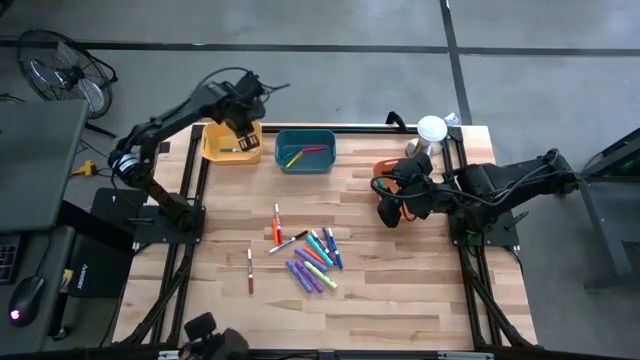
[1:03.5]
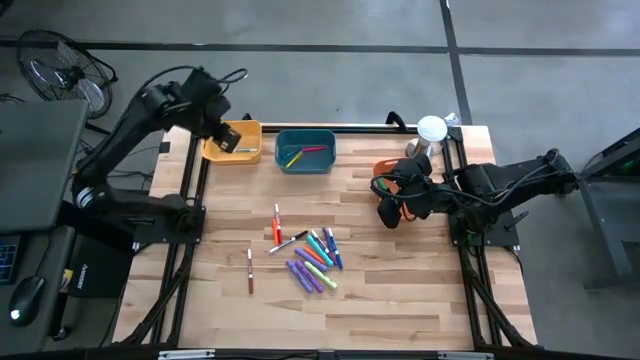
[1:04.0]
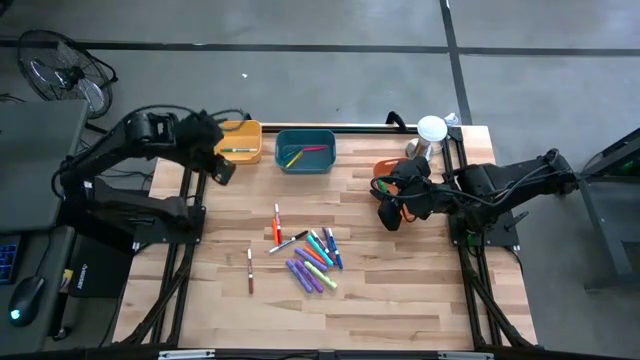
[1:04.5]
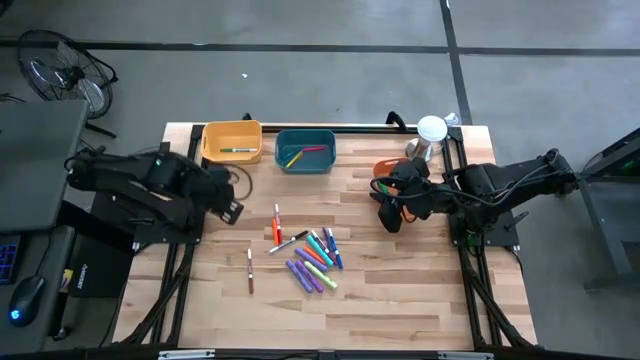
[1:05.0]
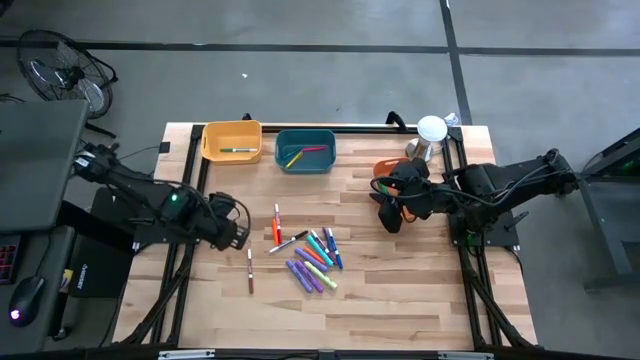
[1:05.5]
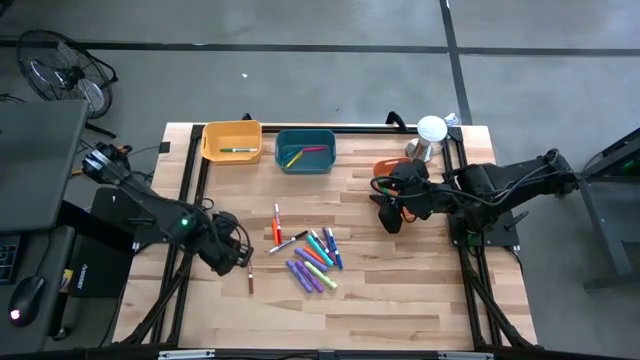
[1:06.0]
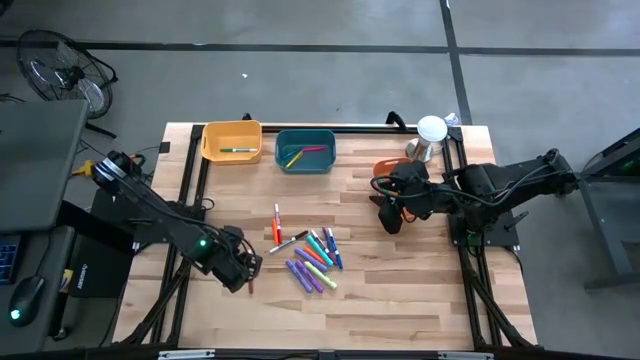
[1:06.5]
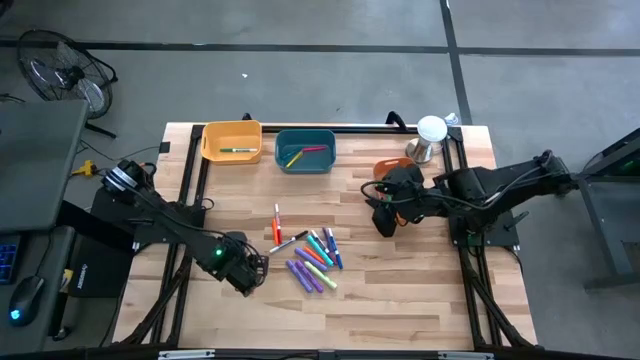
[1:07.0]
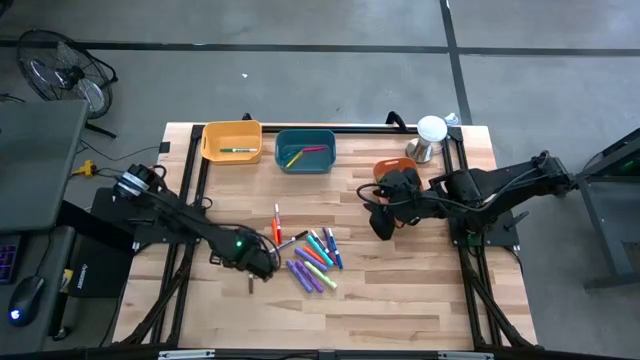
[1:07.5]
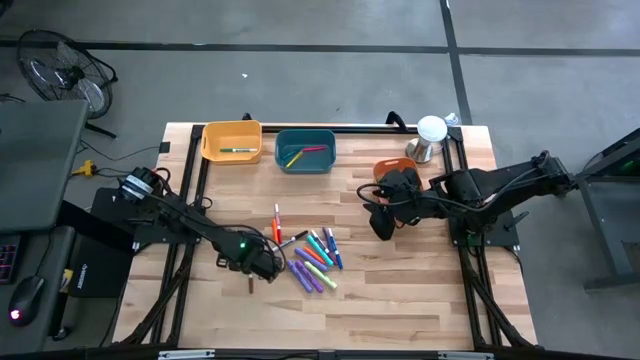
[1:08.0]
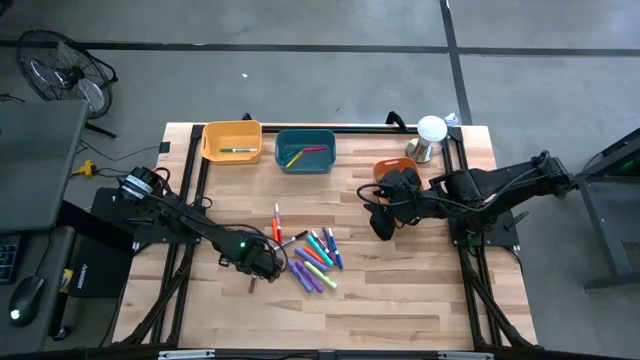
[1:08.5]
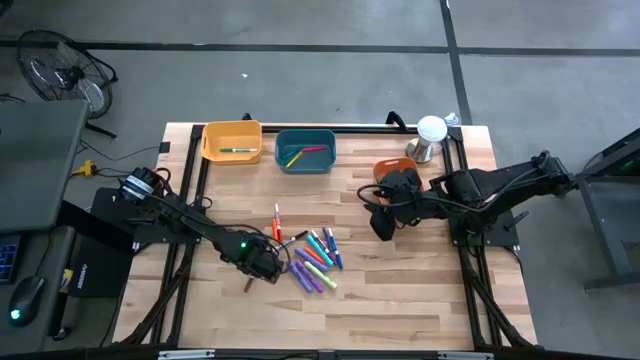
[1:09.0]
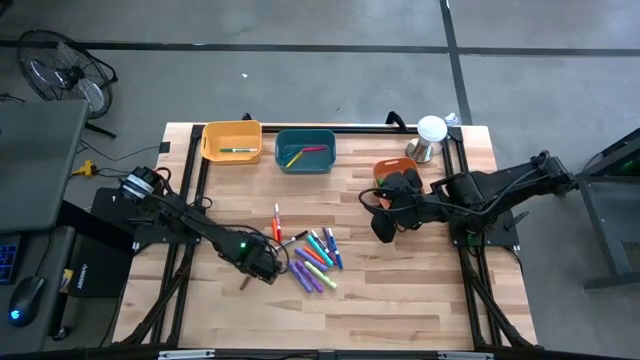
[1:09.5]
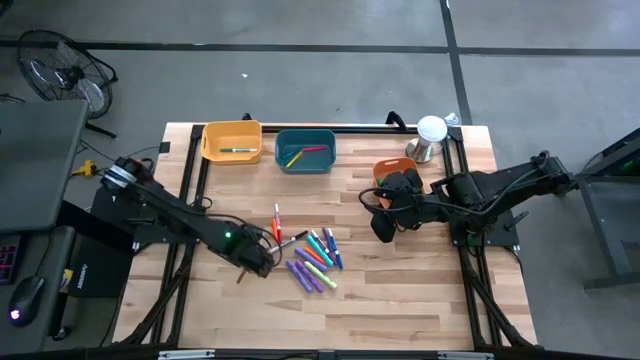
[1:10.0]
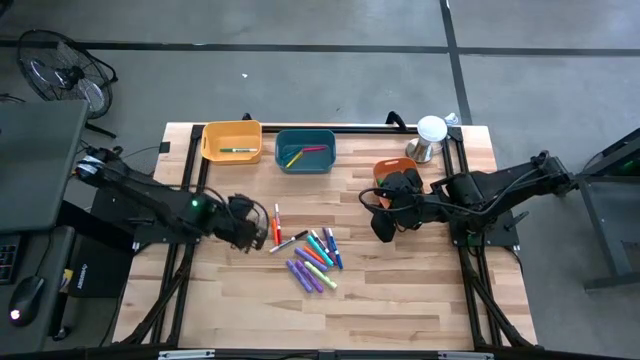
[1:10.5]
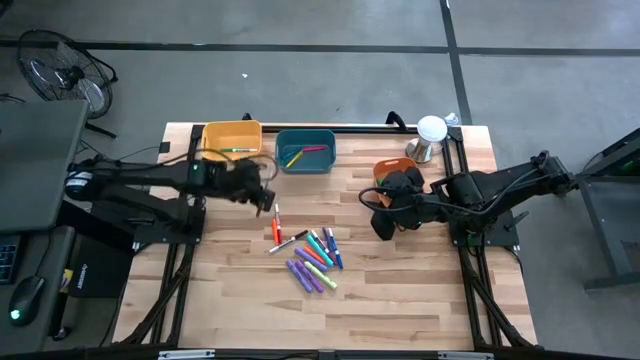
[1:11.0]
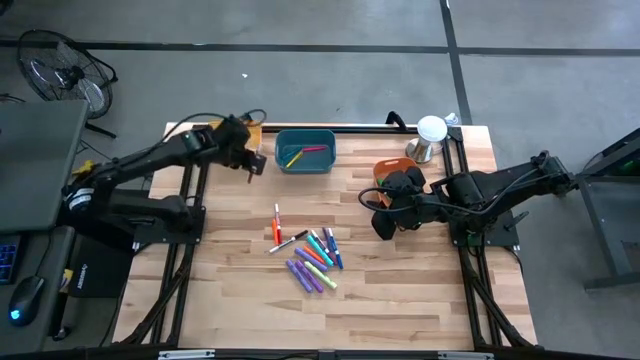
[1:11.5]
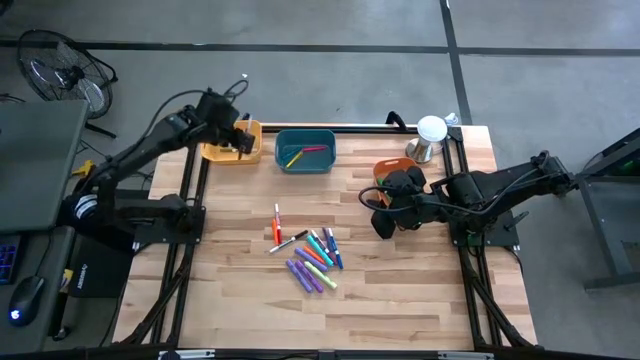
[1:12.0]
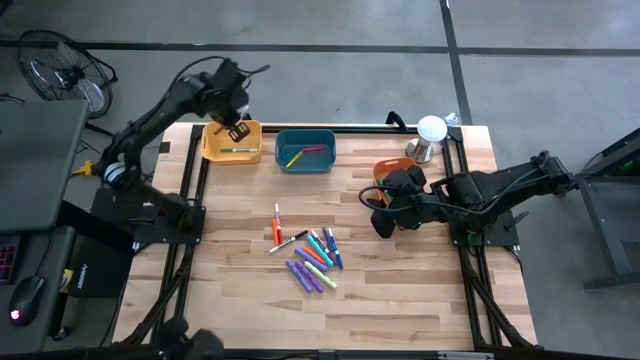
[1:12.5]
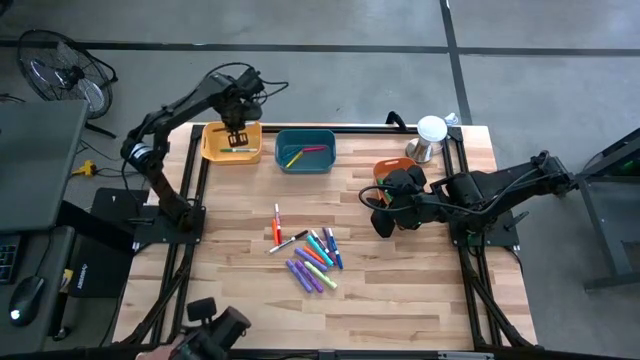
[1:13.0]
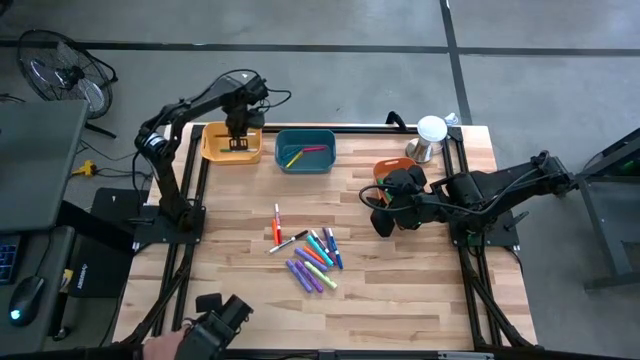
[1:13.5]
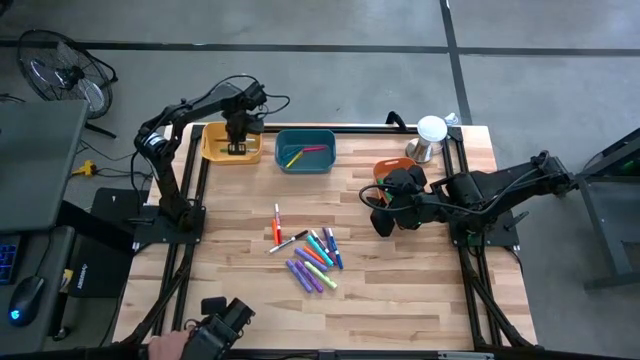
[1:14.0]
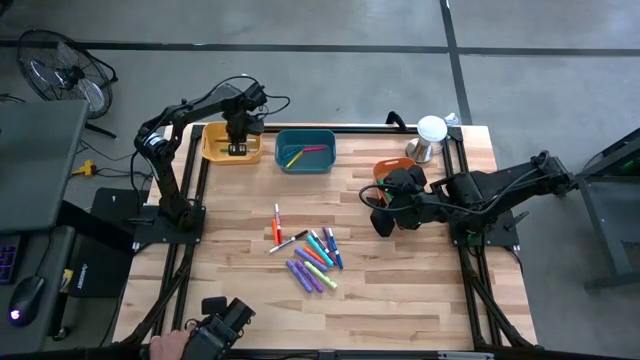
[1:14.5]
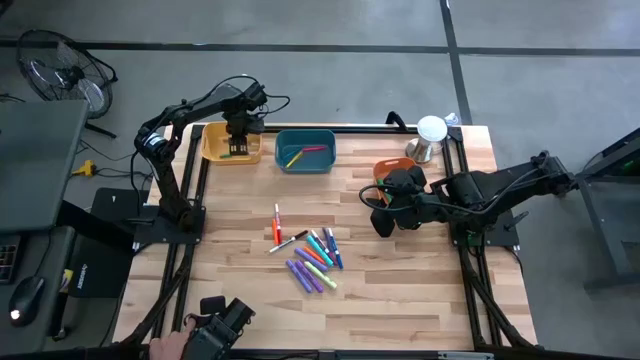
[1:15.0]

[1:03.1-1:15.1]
Task: Pick & Place Markers
Put the brown marker pen into the yellow bin

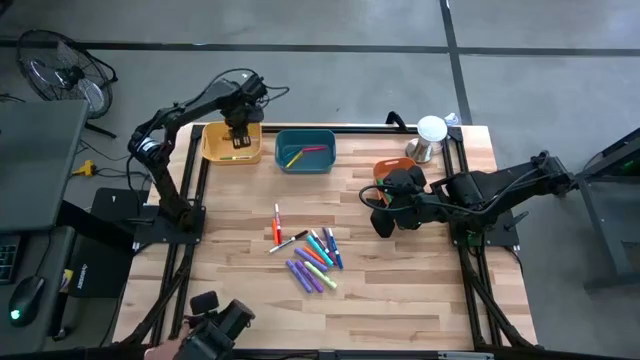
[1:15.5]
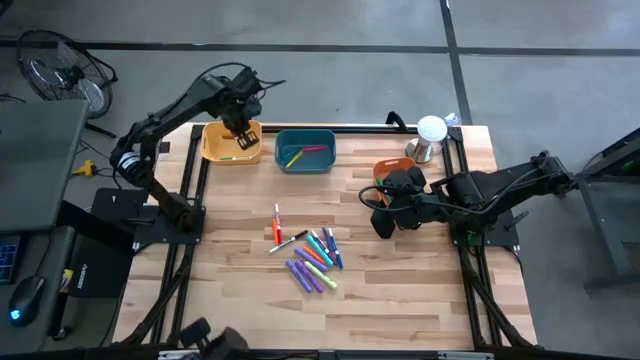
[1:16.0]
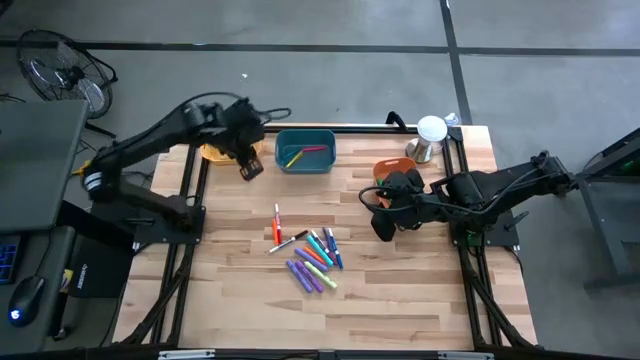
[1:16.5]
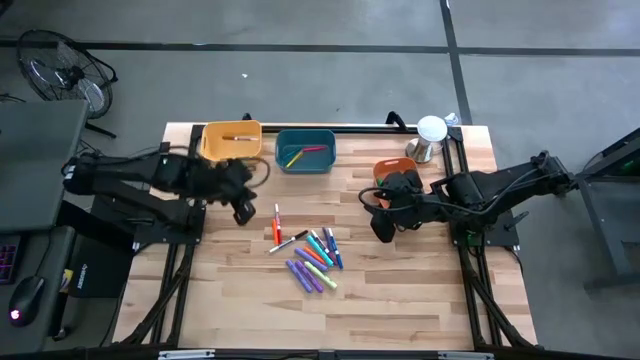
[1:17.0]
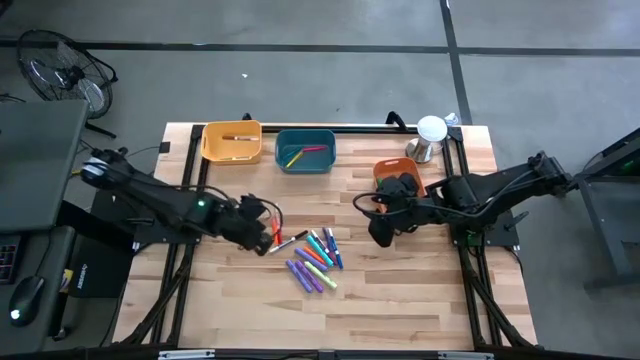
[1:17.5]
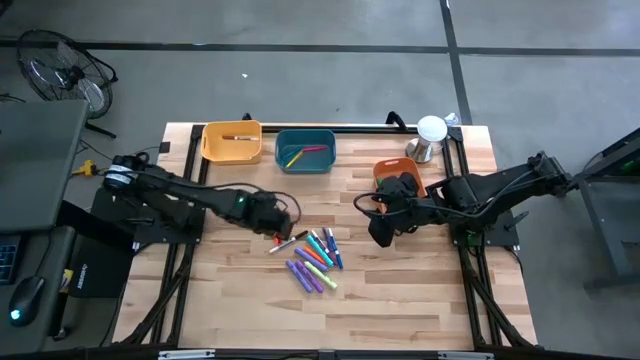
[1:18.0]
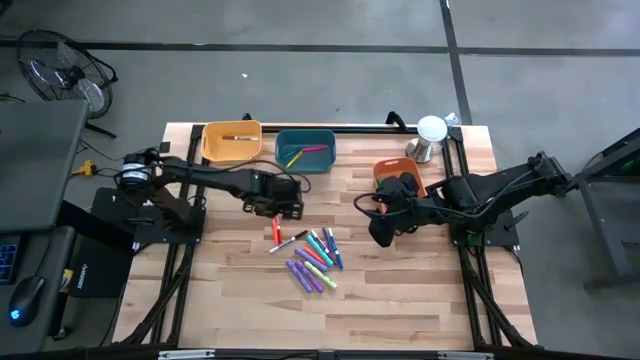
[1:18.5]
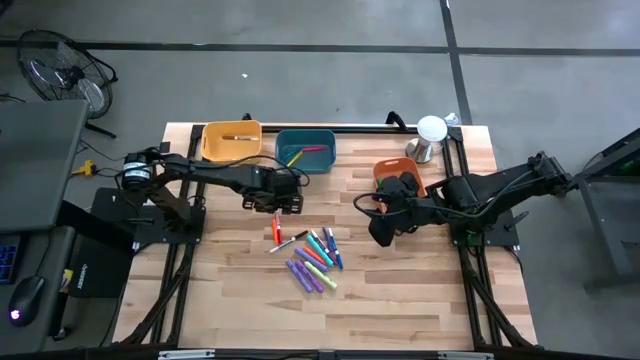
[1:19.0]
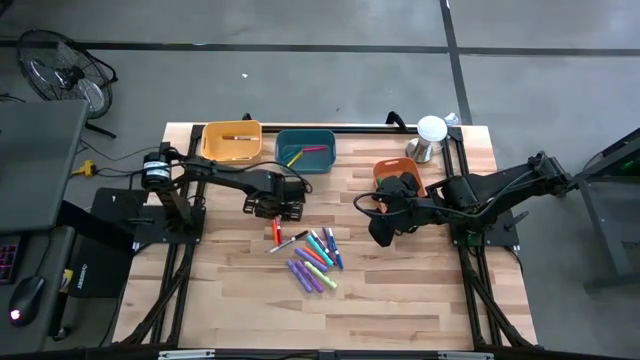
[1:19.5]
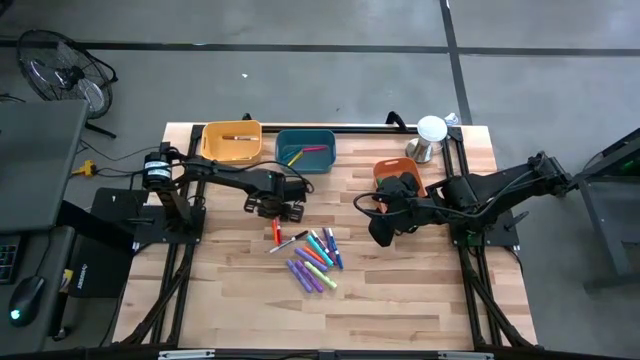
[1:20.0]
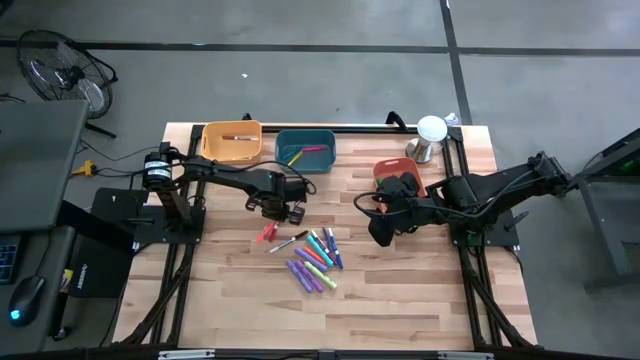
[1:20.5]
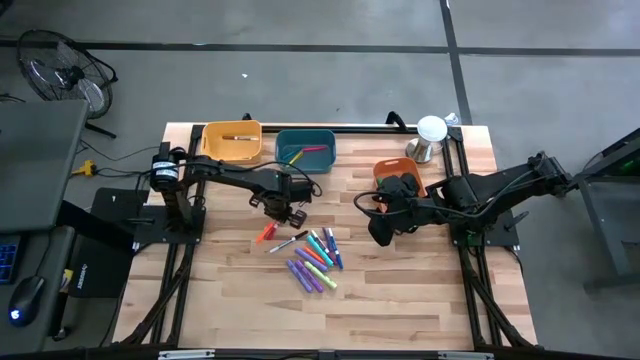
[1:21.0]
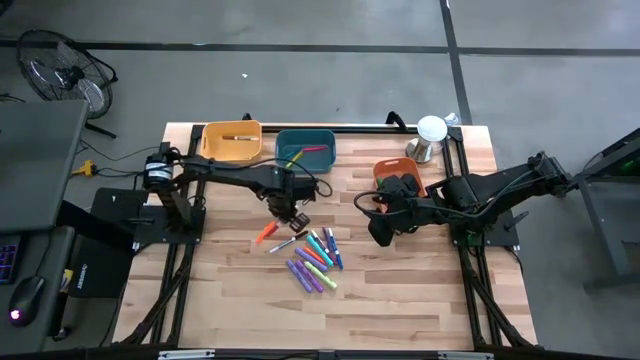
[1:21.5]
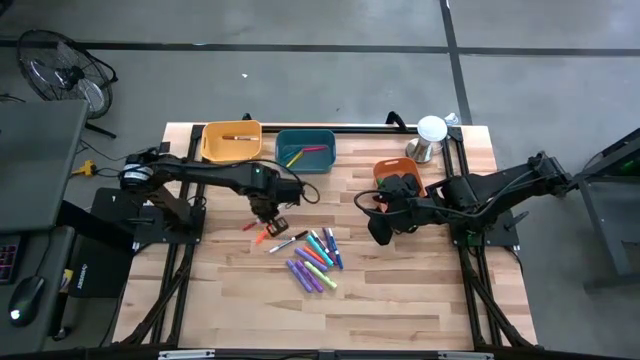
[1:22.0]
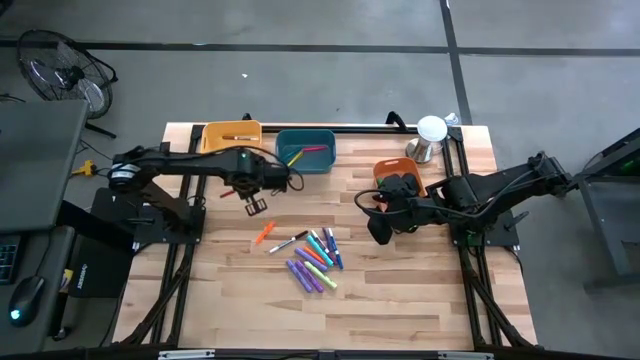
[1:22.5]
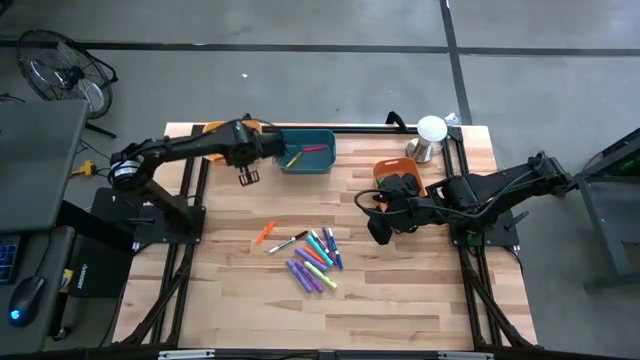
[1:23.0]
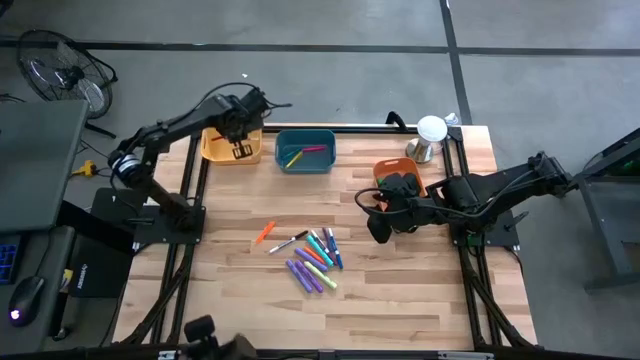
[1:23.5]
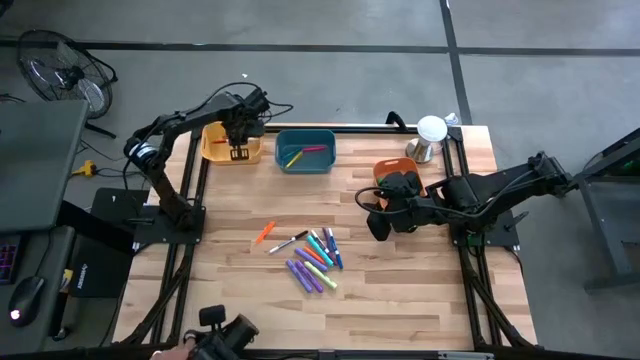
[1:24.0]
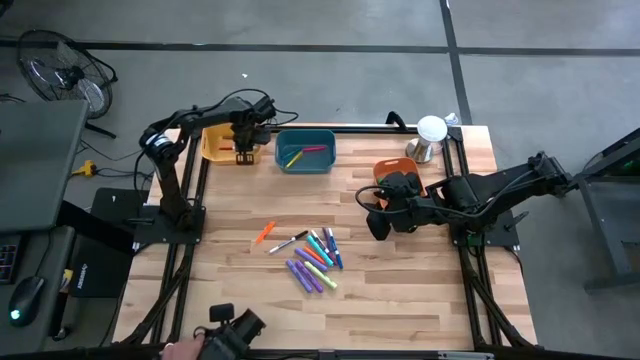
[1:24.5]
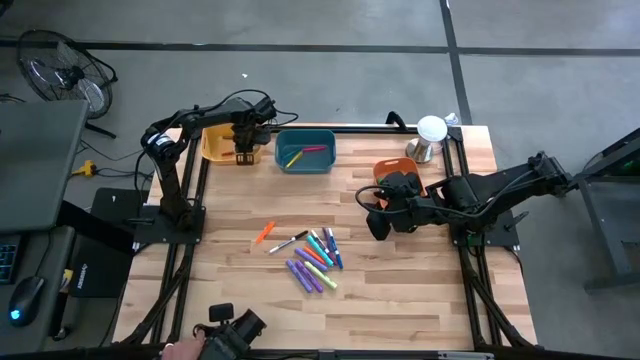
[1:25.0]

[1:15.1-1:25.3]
Put the red marker pen into the yellow bin
